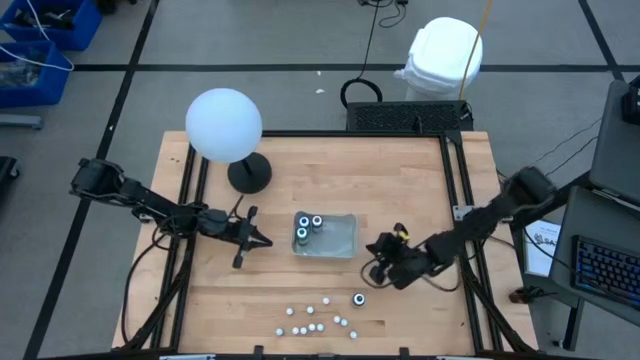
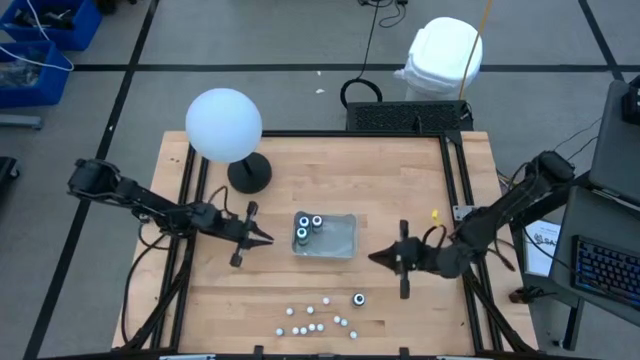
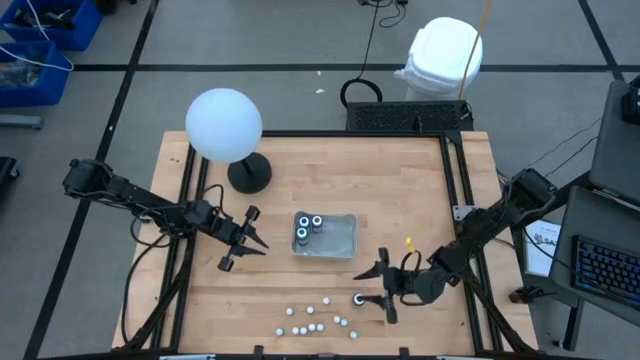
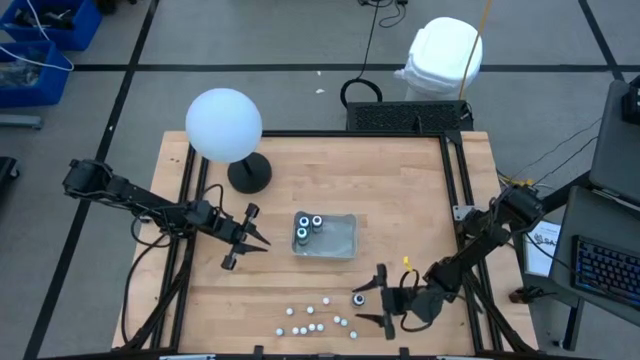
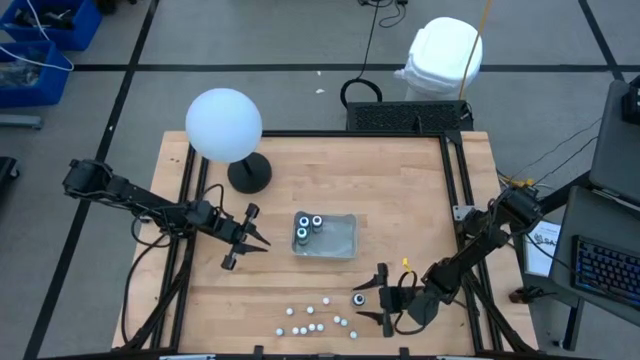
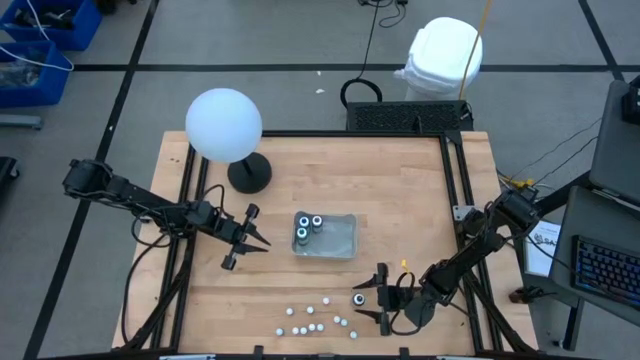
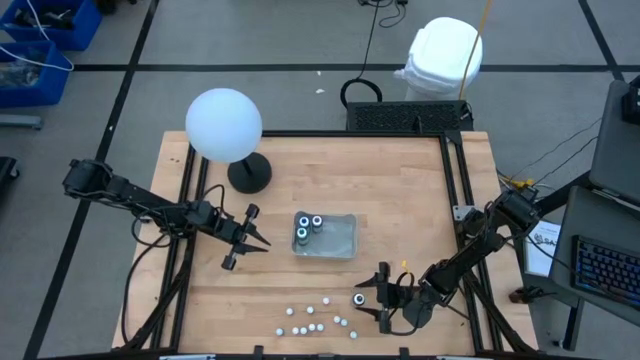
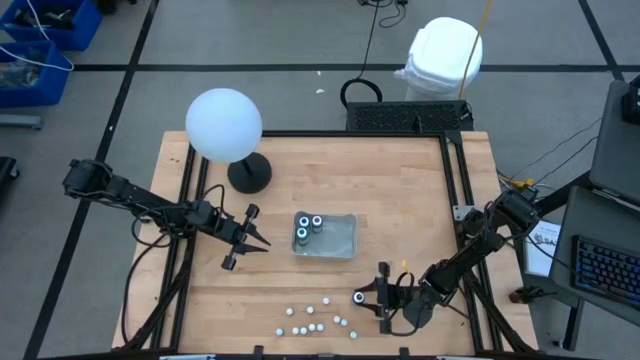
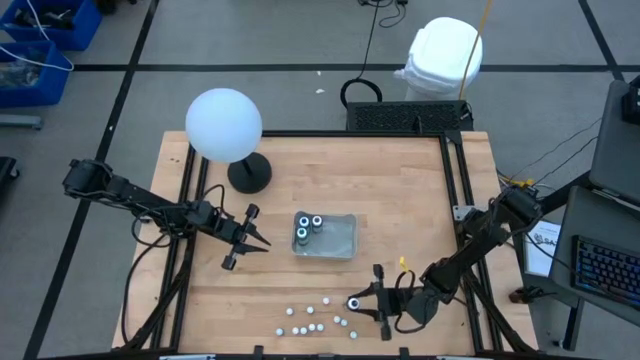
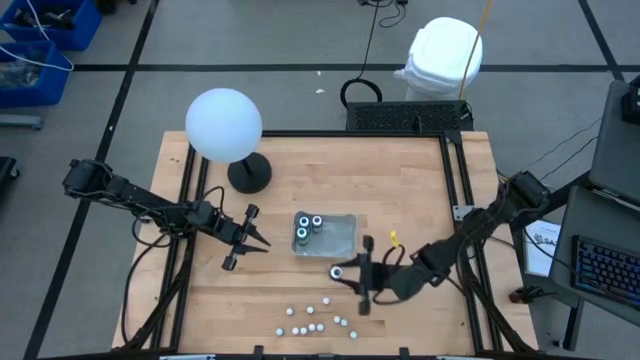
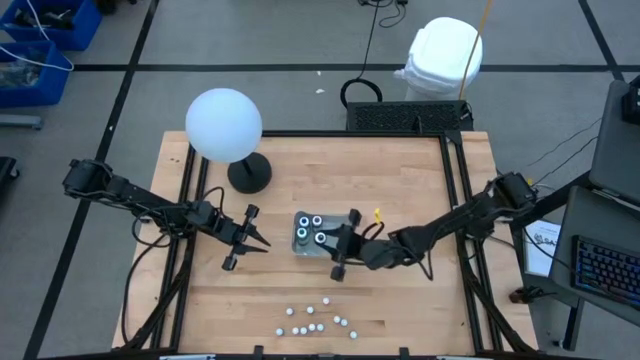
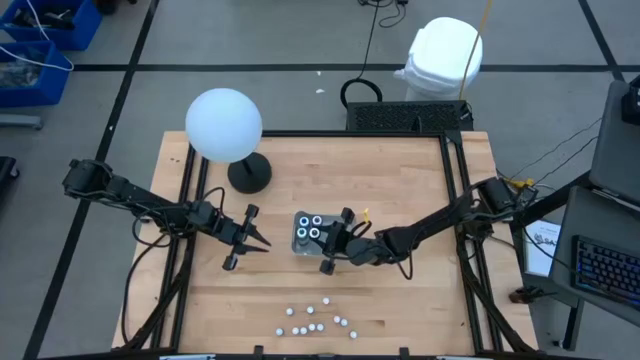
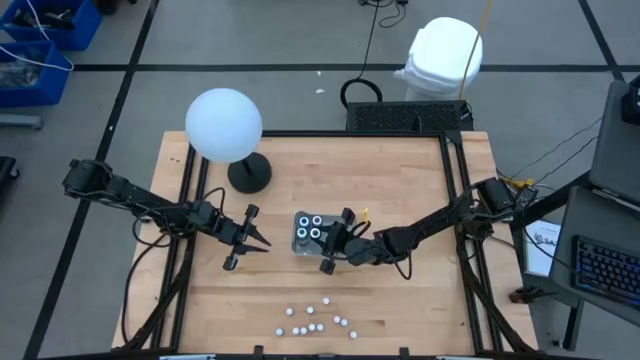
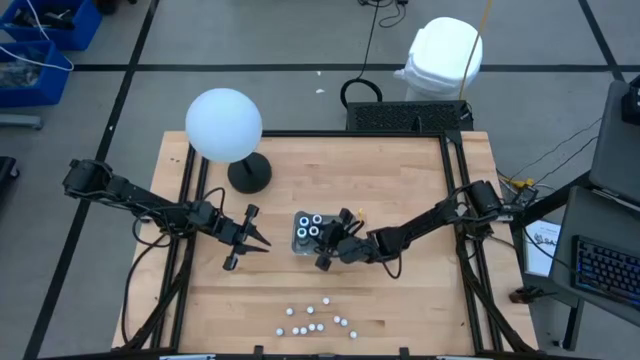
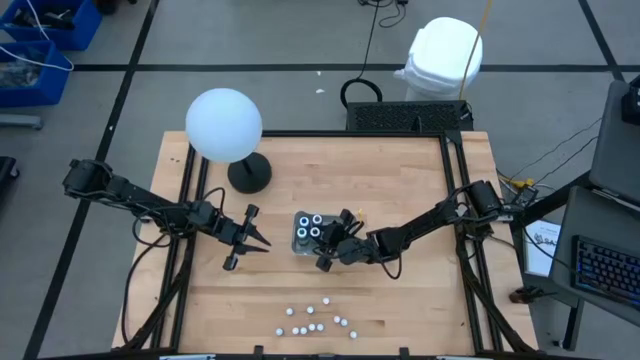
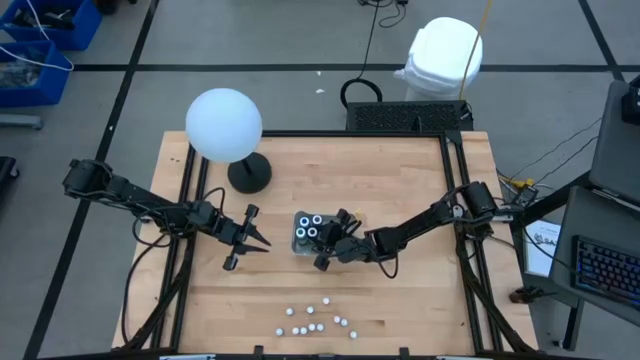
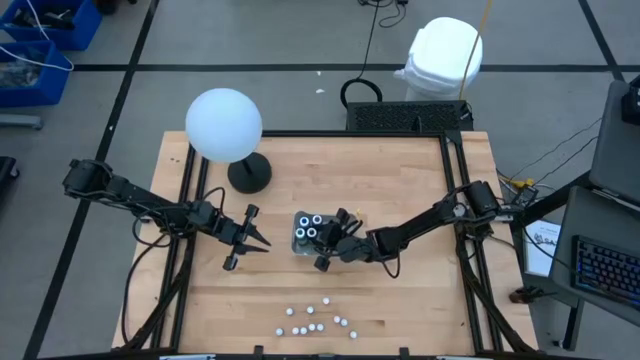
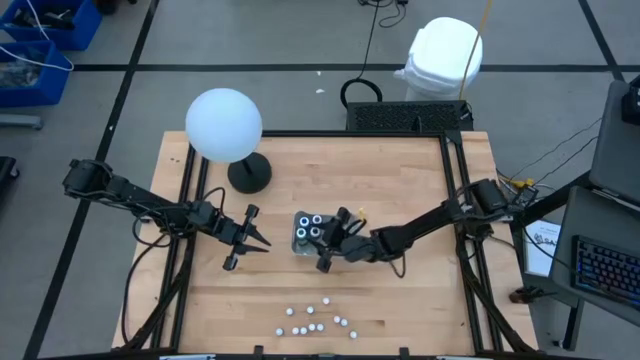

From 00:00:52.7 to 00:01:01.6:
Task: Pick & Place food coloring
Put the large black food coloring bottle into the gray bin

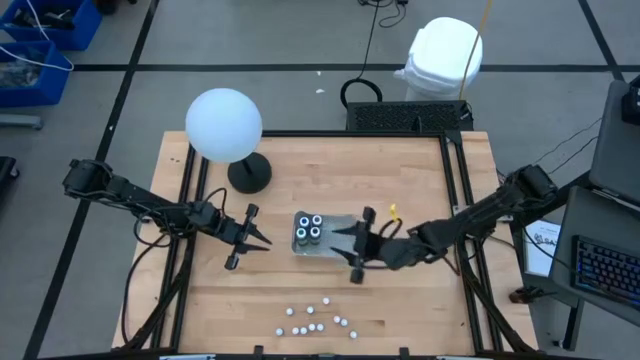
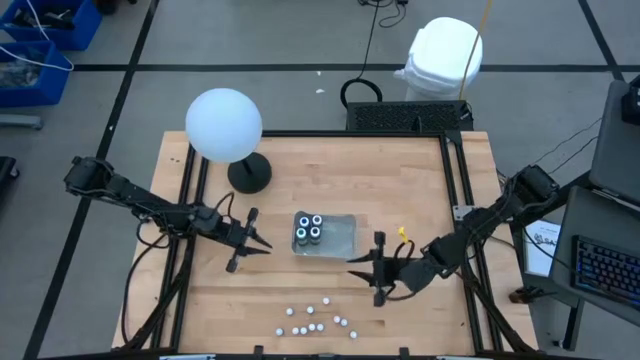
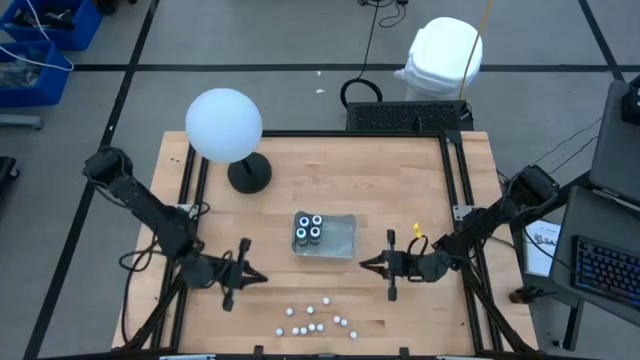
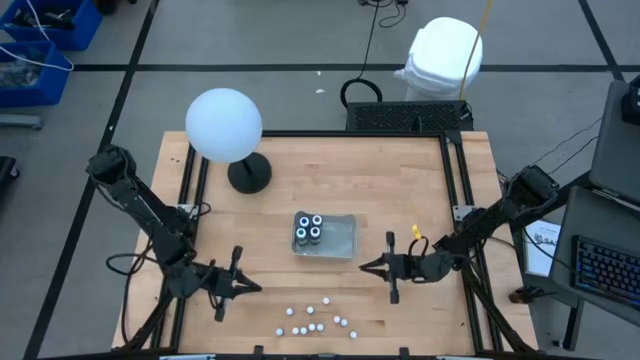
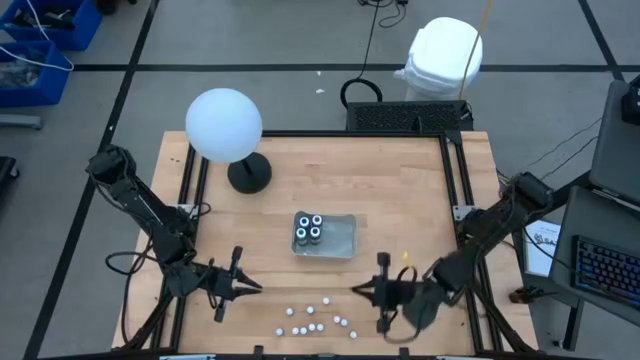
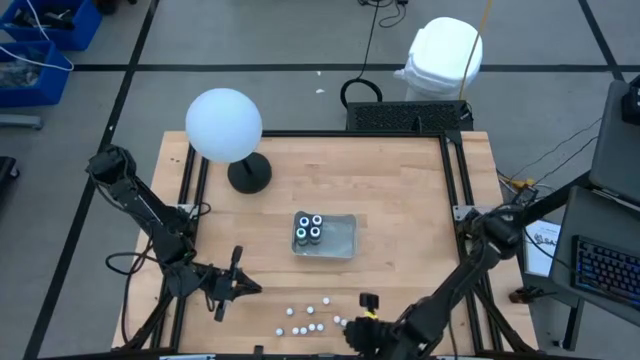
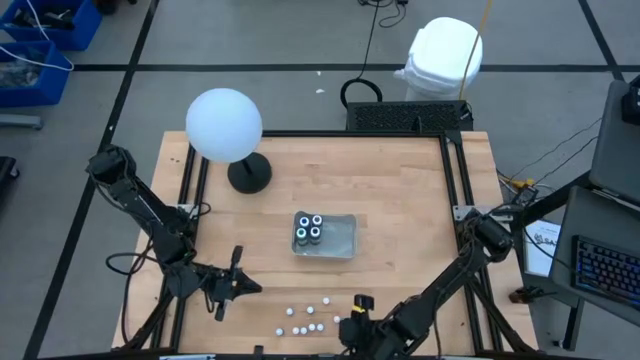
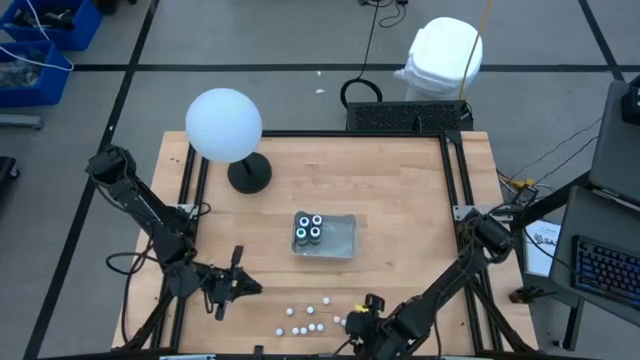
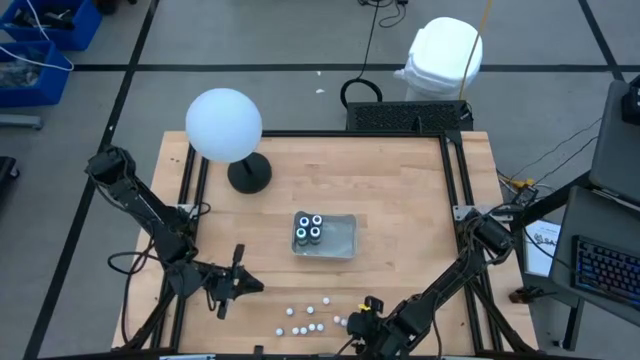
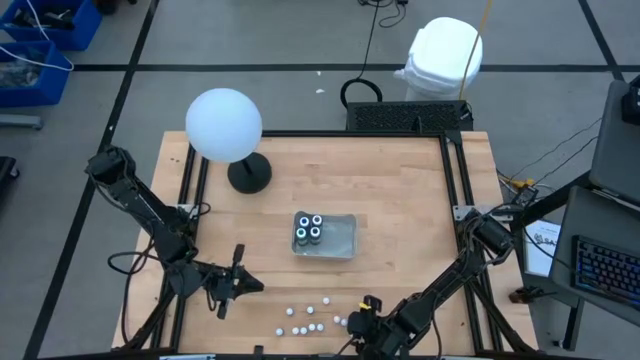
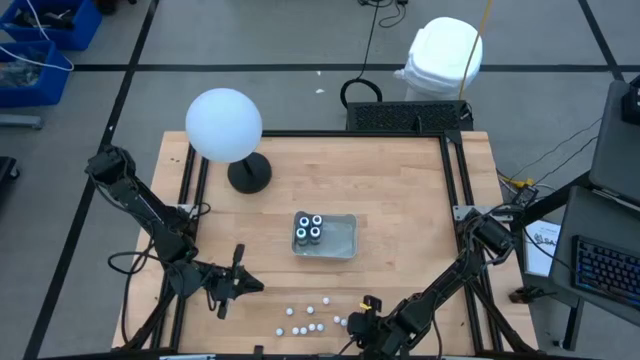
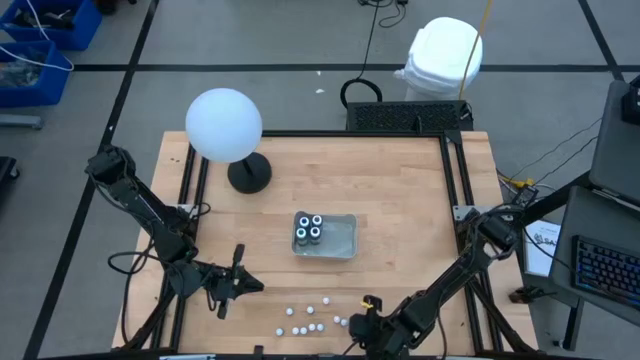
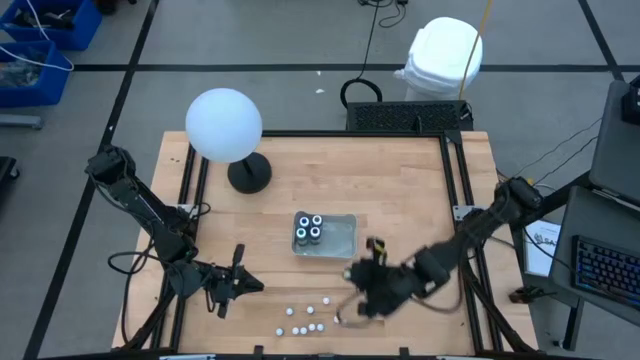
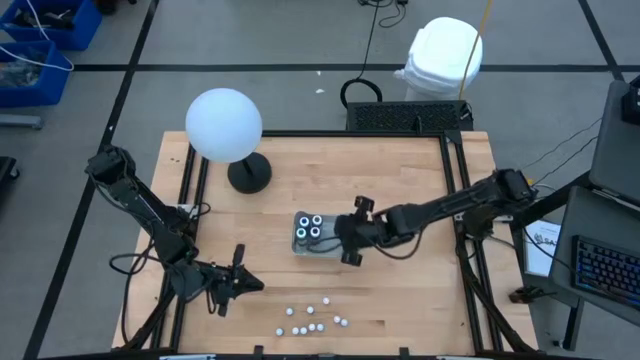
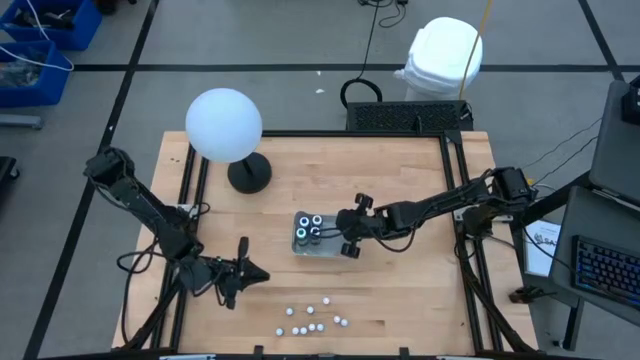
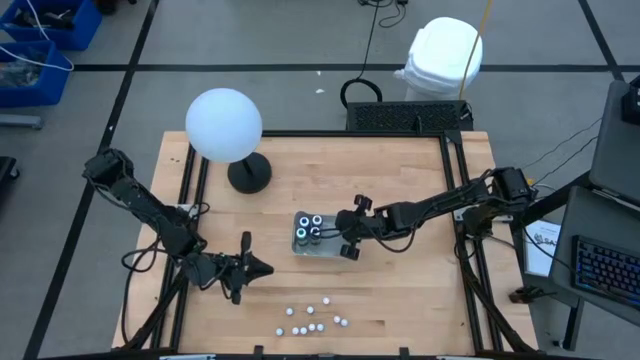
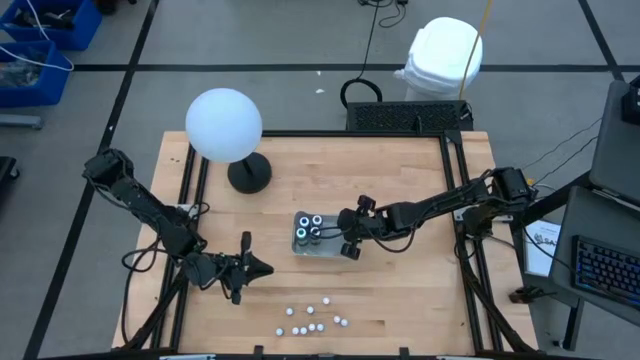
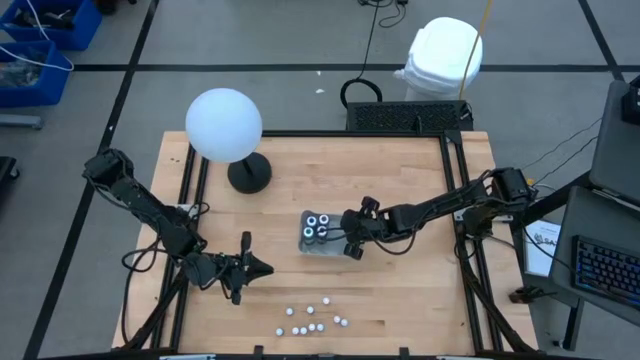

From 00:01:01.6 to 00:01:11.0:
Put the small violet food coloring bottle into the gray bin

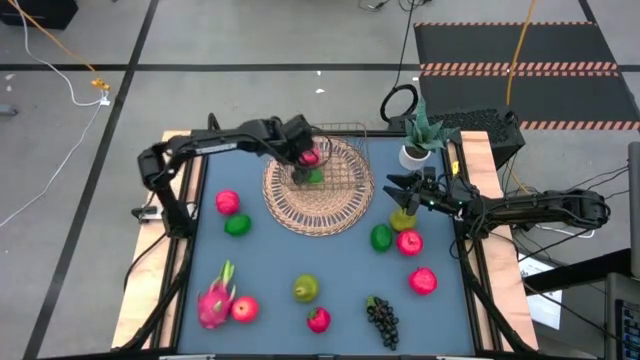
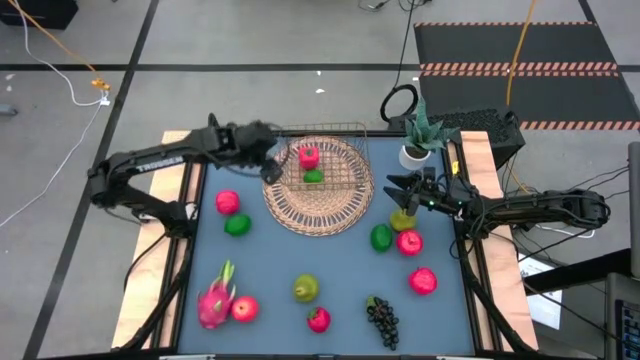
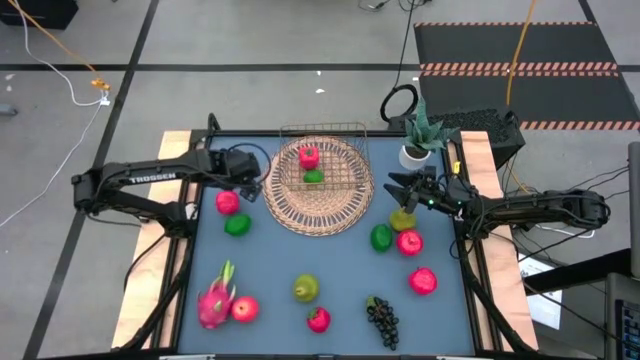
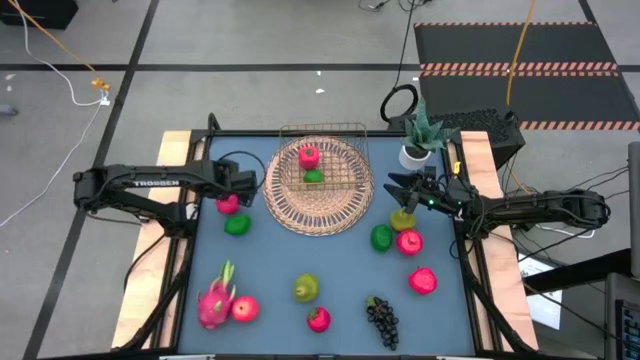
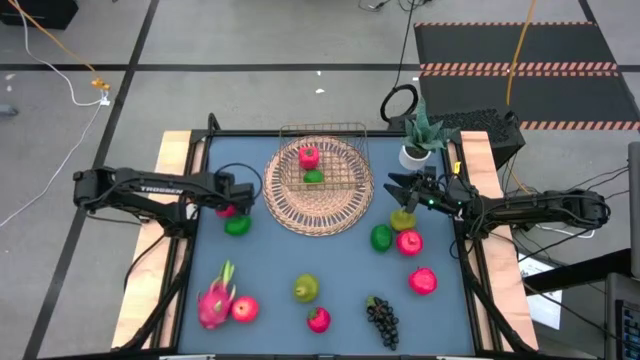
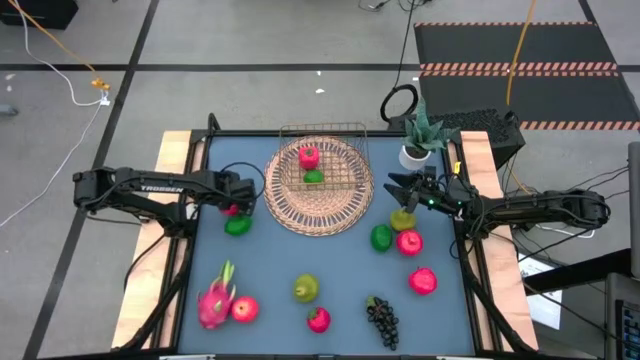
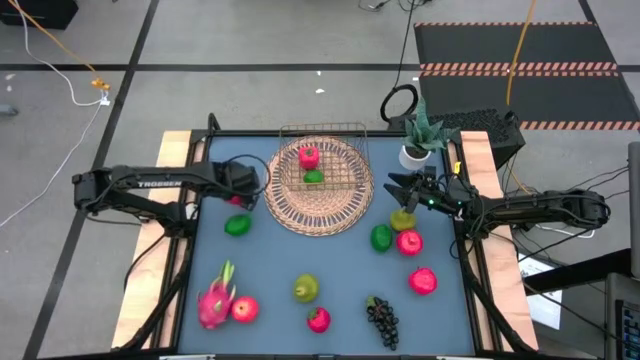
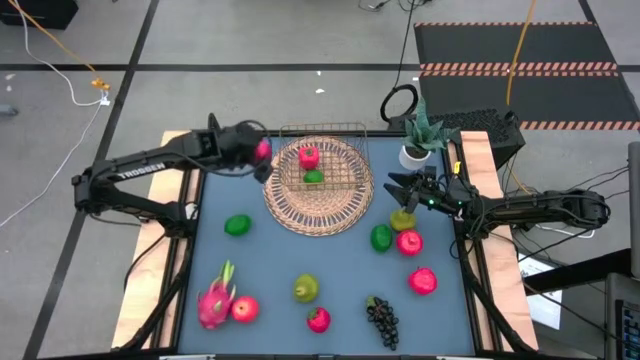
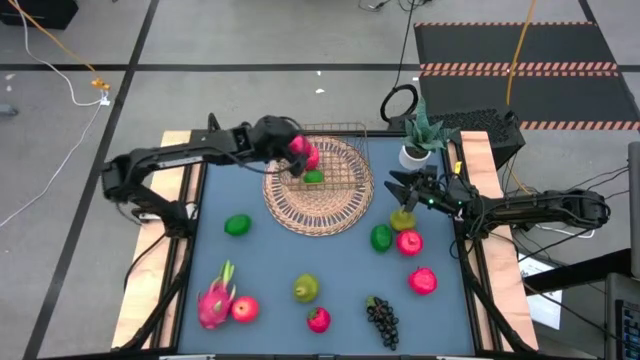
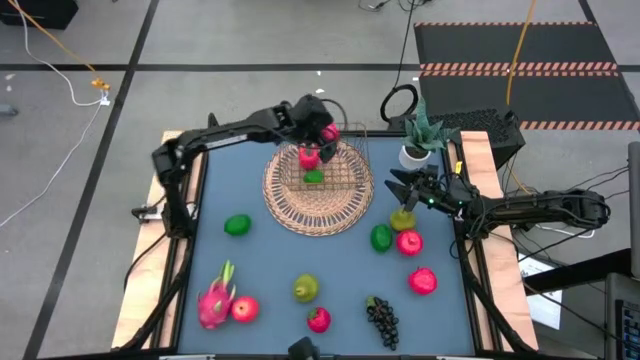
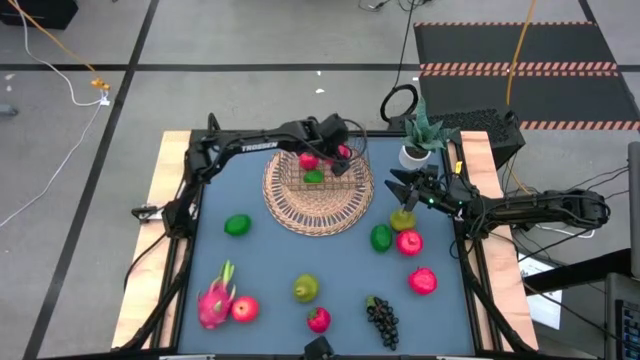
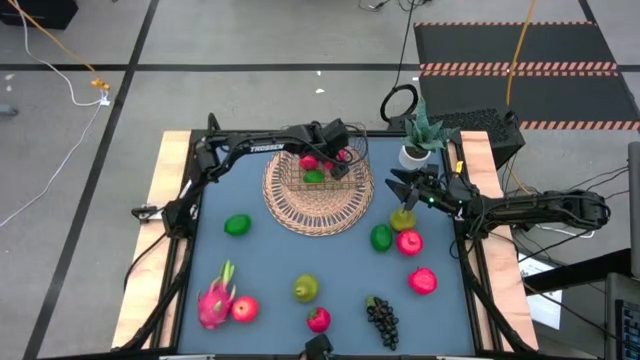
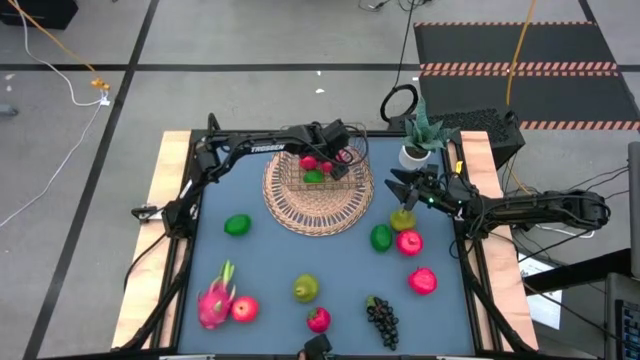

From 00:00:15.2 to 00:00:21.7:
Task: Build produce basket
Put the red apple into the gold wire basket
